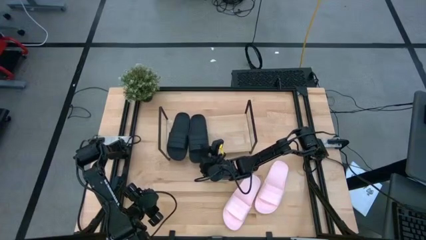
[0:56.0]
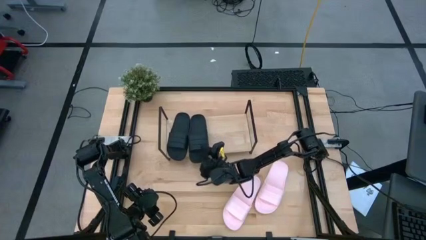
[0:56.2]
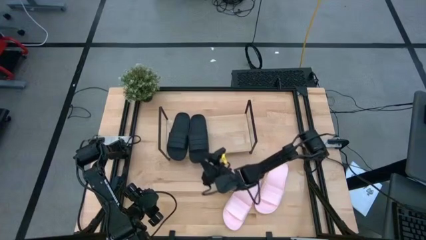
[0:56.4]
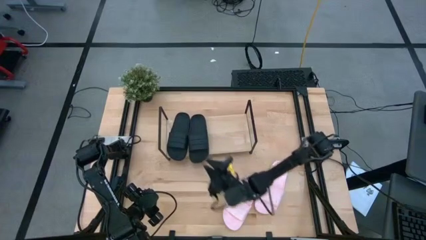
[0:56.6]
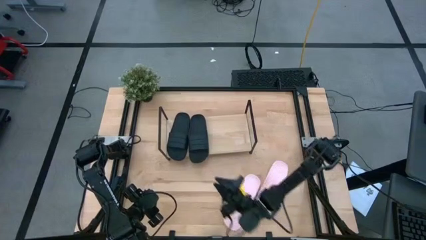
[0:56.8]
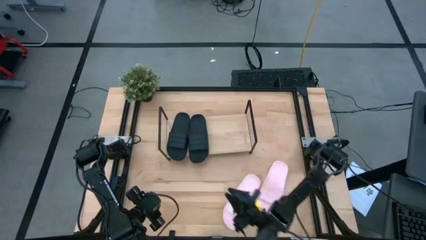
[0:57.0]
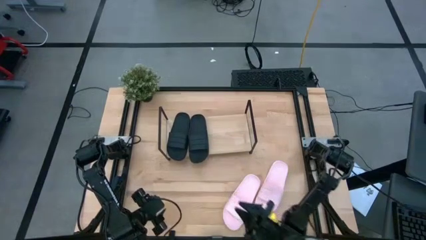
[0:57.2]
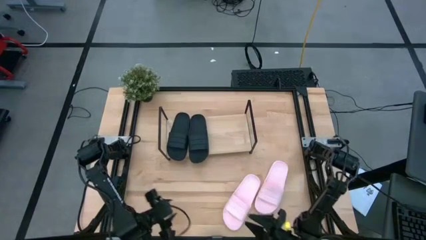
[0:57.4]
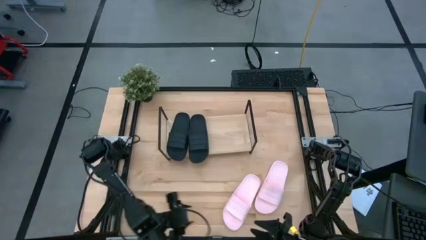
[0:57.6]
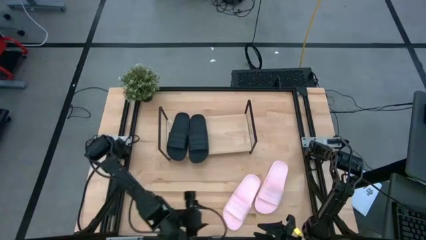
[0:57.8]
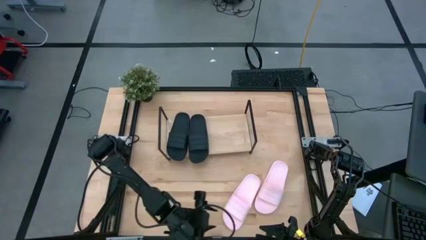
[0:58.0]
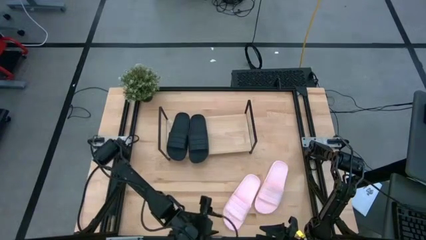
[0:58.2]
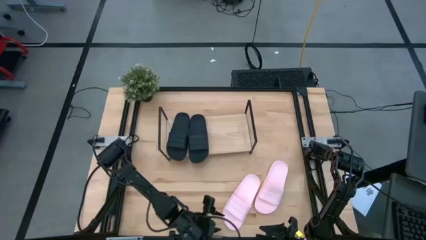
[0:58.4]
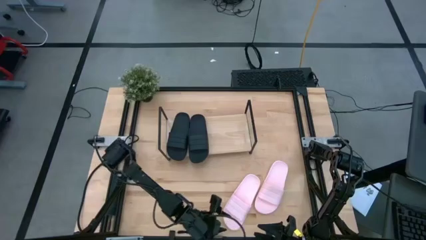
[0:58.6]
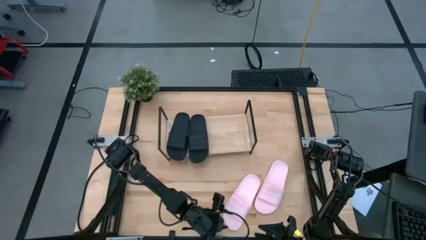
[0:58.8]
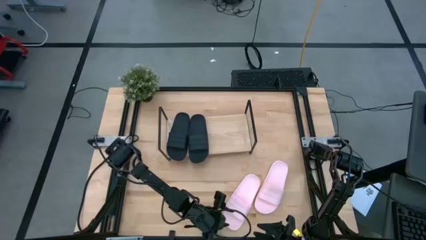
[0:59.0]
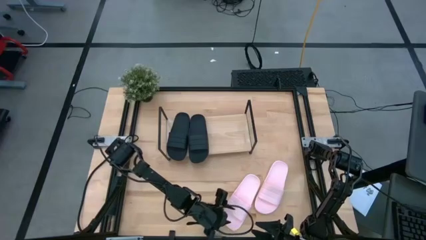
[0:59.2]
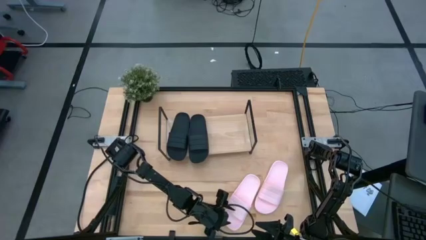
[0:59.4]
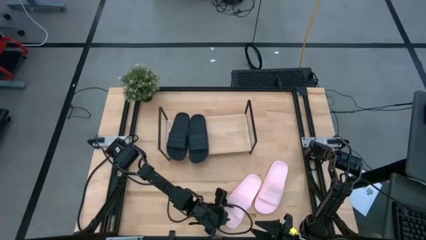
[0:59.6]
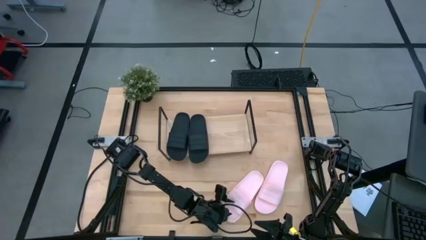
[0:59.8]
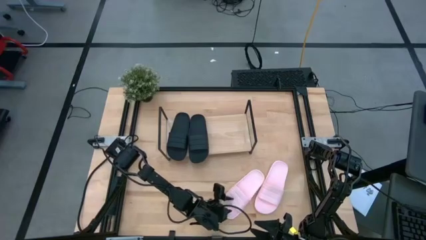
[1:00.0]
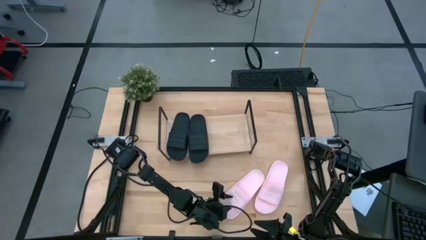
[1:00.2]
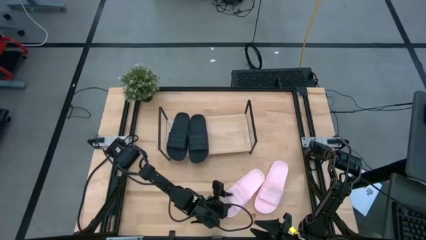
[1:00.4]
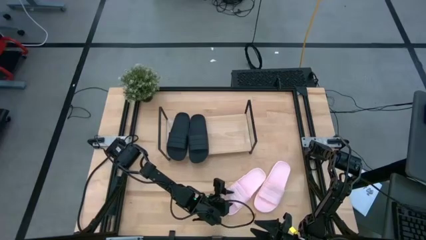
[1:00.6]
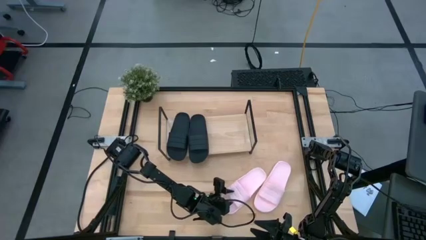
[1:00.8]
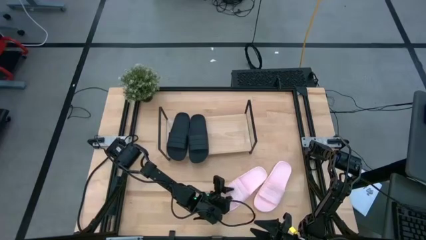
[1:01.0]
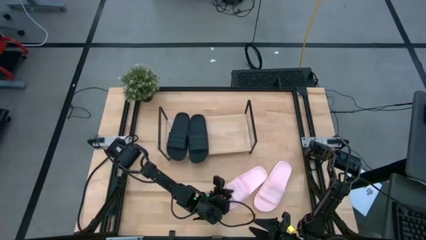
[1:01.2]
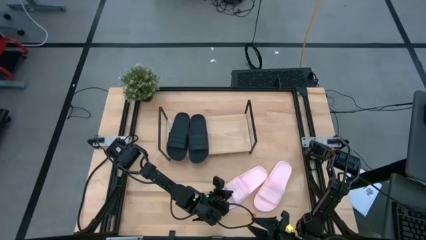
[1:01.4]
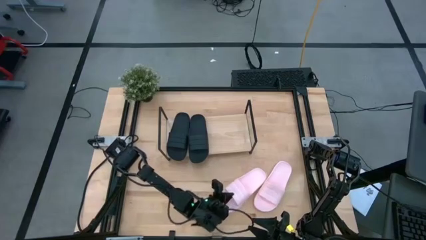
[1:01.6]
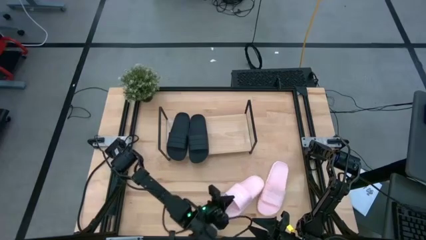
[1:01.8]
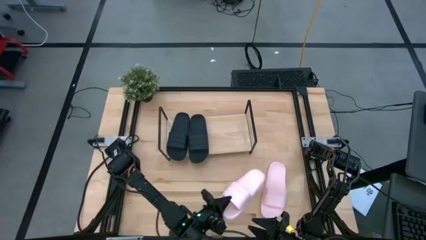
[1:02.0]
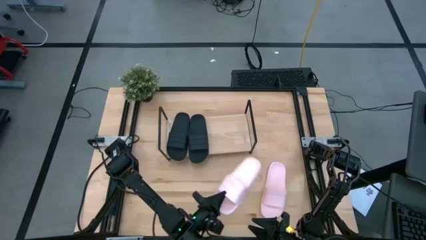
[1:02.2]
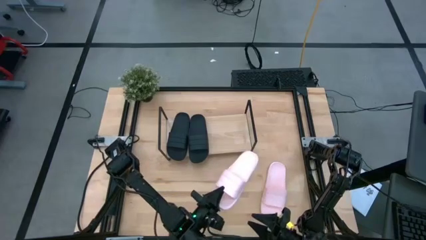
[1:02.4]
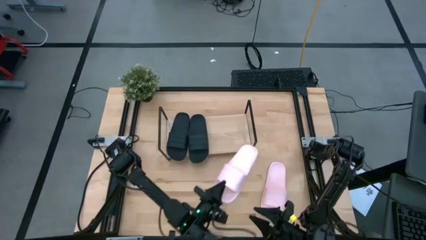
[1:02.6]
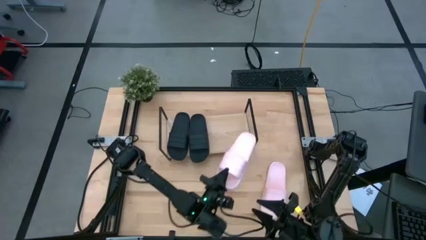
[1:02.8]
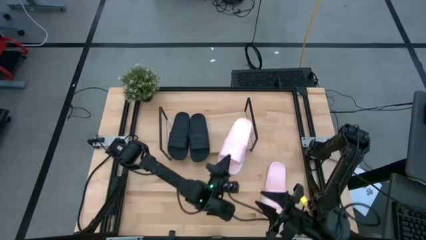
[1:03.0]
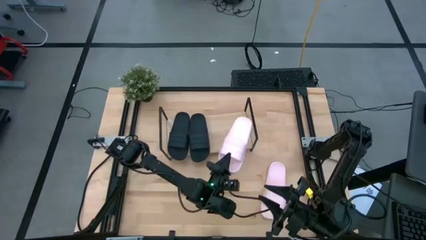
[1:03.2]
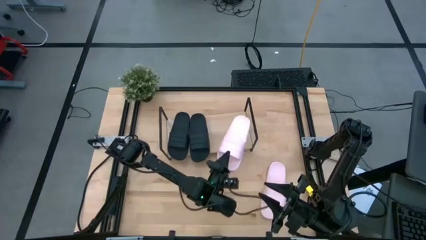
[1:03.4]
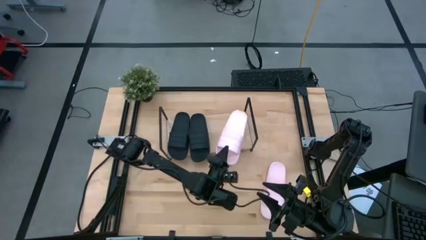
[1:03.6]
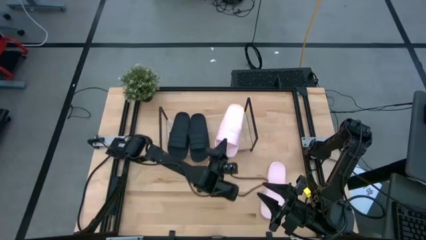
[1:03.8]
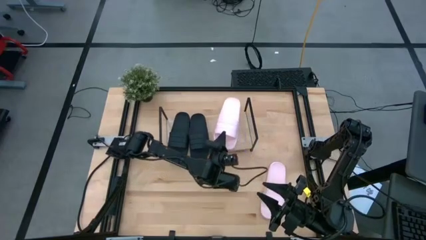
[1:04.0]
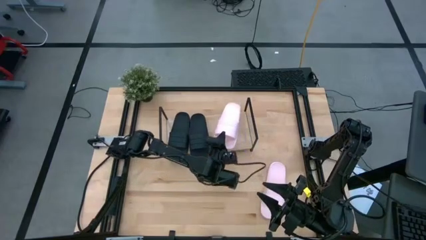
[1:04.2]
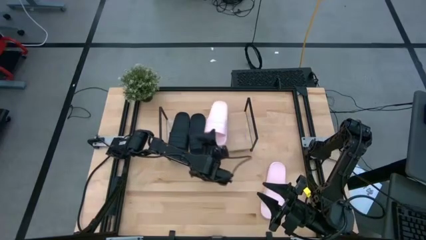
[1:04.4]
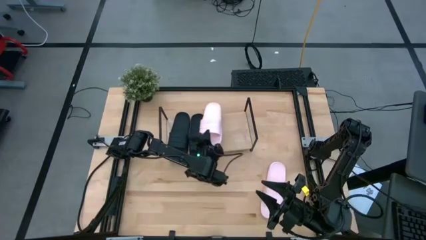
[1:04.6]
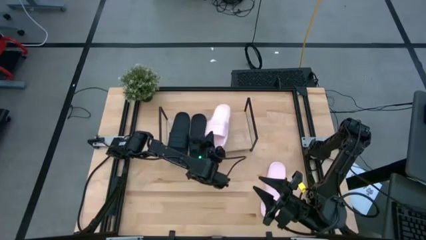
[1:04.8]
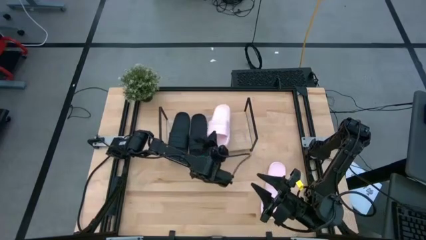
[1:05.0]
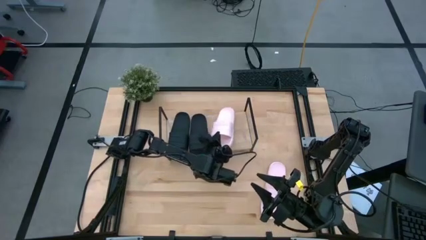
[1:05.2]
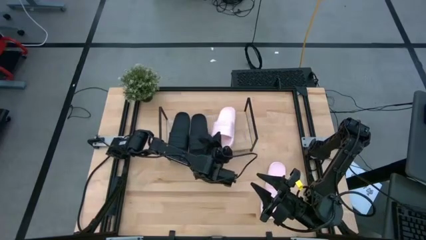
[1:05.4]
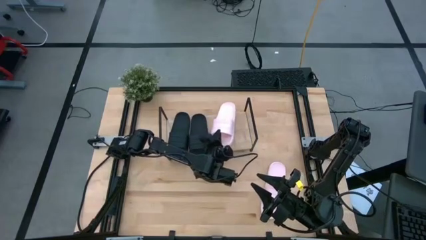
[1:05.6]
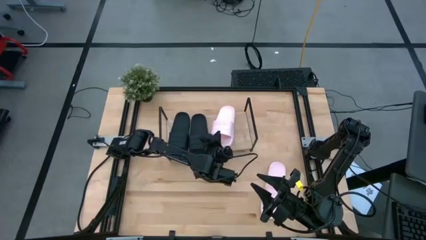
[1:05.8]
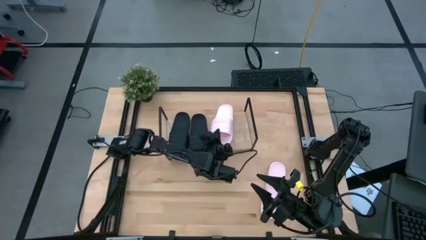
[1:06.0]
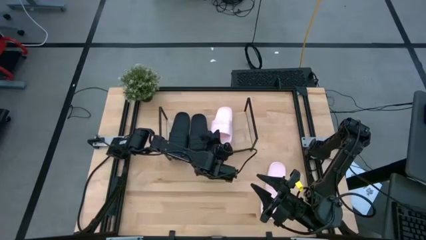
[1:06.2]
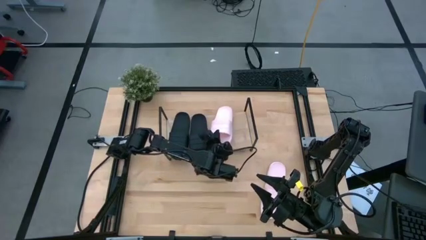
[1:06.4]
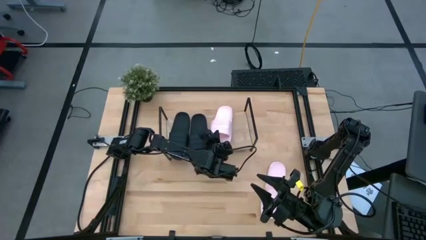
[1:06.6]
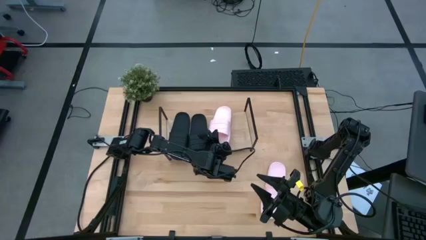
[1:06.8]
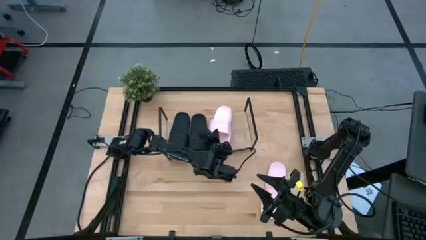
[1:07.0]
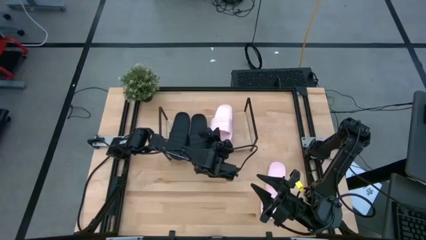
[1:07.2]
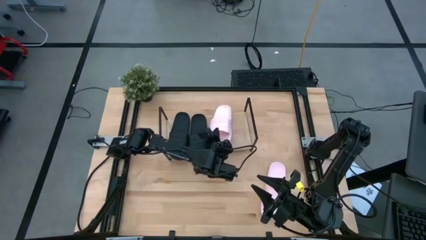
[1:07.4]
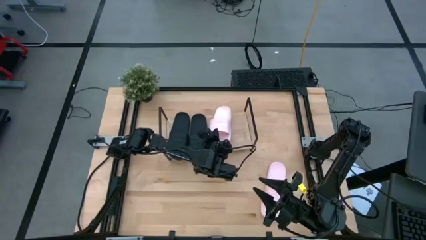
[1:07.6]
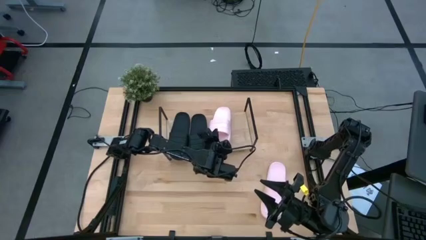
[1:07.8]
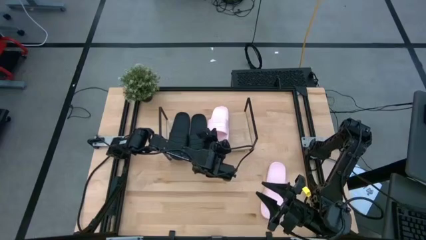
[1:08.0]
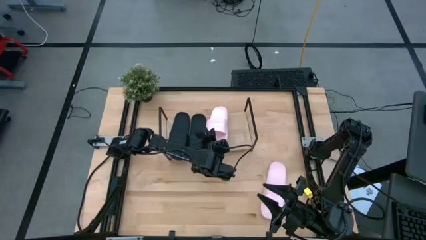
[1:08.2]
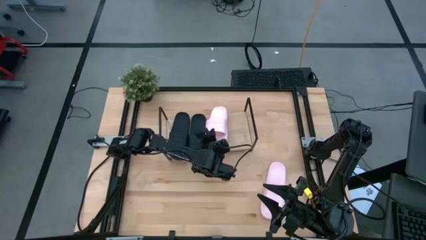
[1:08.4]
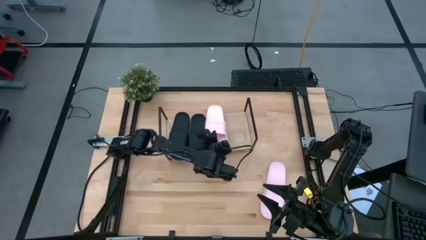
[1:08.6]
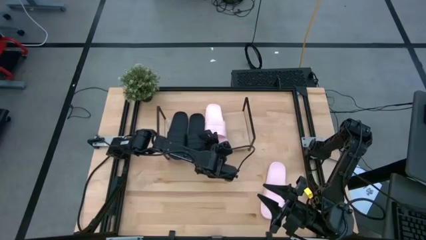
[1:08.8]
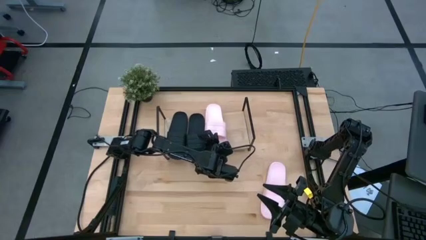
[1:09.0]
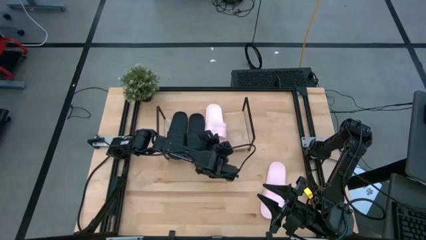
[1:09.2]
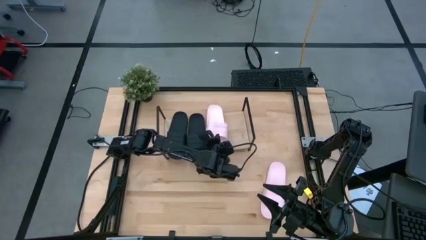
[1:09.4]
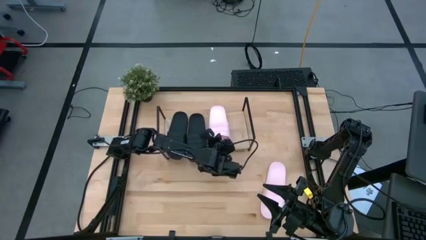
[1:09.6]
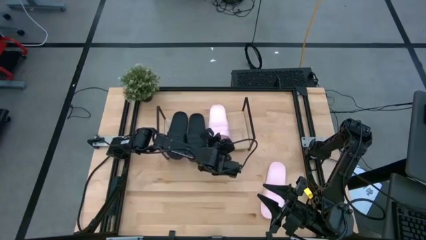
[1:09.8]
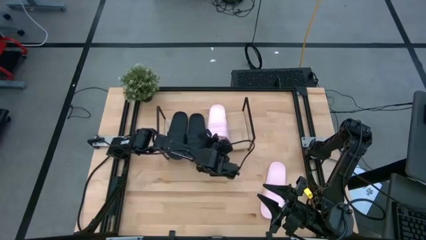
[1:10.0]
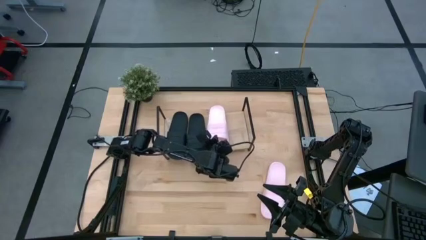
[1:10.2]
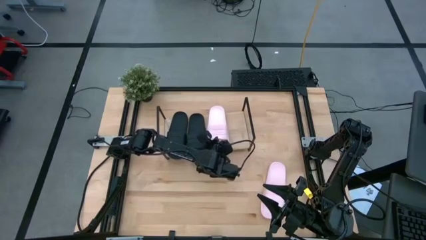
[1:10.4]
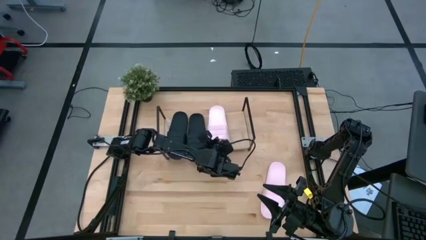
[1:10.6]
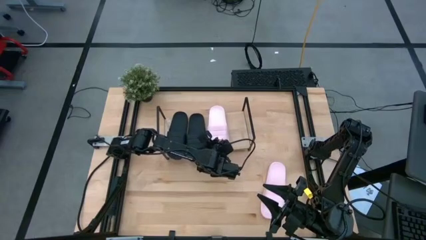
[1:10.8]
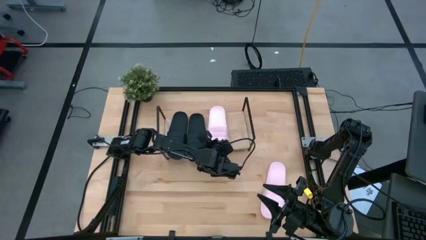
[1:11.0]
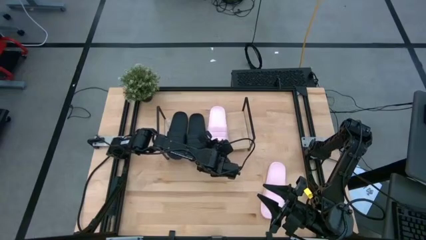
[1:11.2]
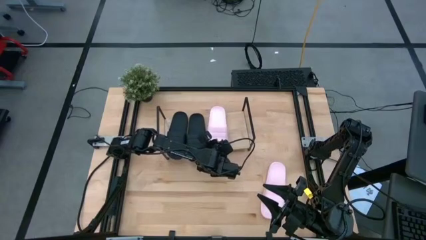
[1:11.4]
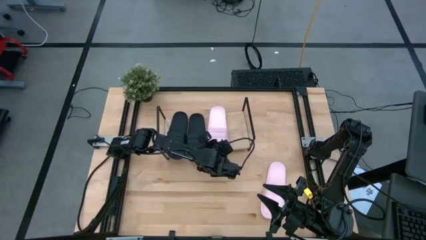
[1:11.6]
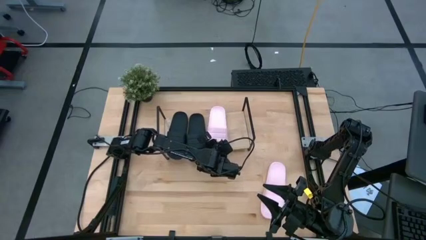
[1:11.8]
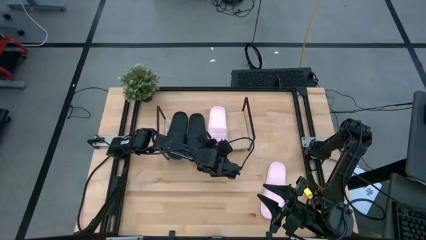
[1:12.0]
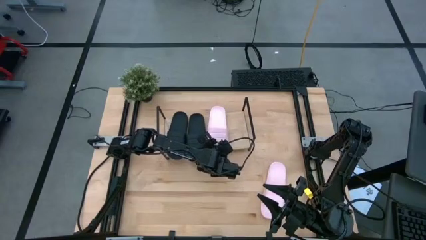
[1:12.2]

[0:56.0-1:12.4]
Task: Pick and place slides into the shelf
Put the left pink pair of slide on the shelf
